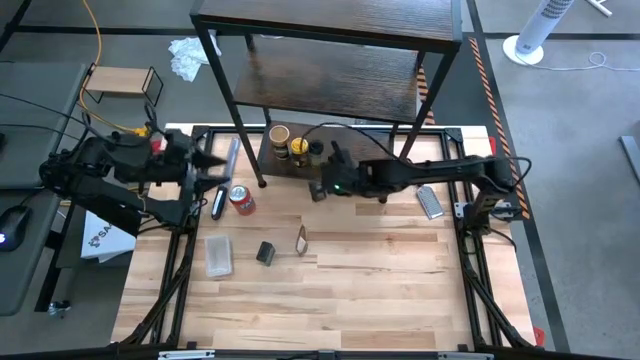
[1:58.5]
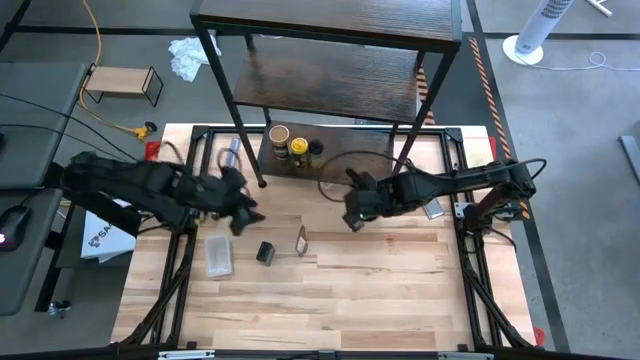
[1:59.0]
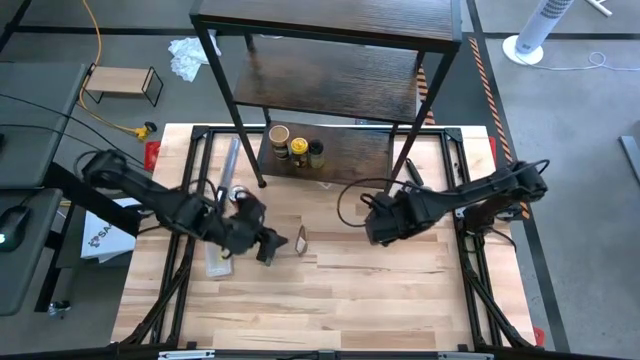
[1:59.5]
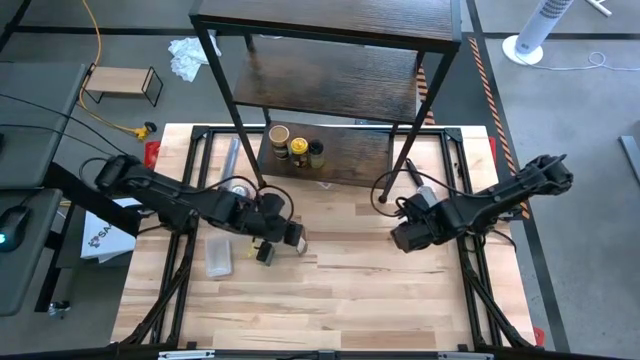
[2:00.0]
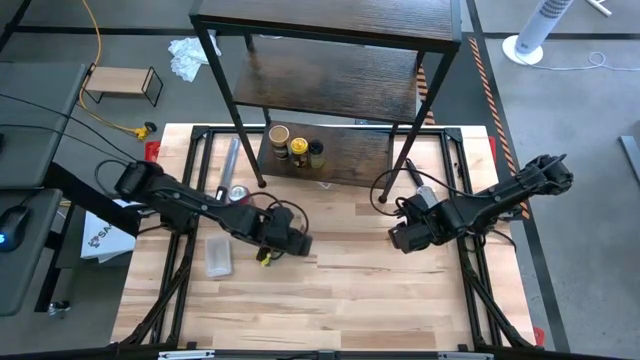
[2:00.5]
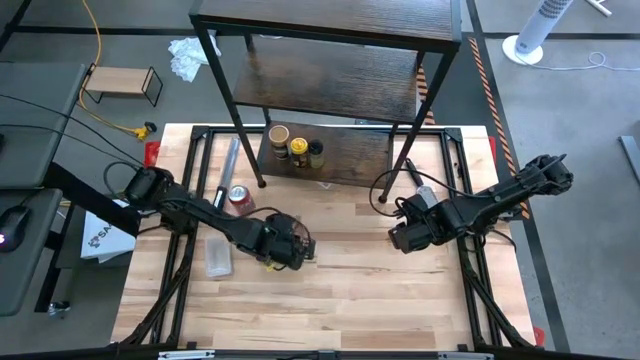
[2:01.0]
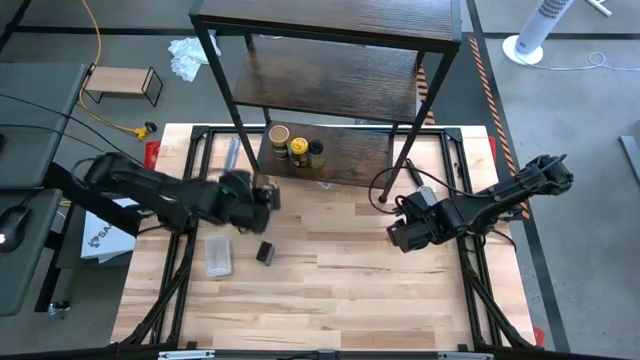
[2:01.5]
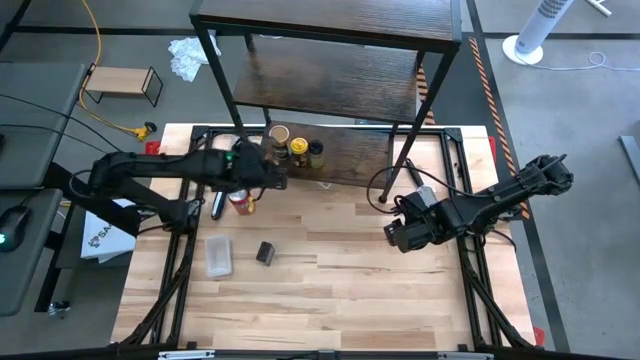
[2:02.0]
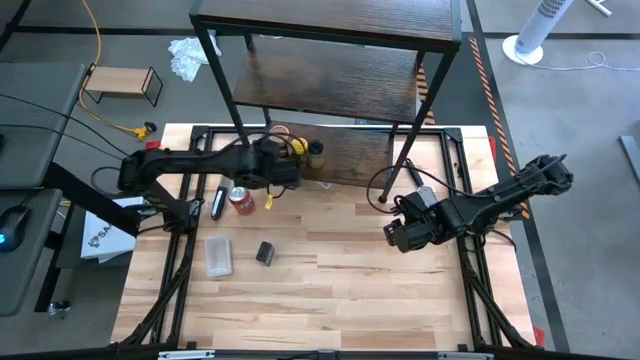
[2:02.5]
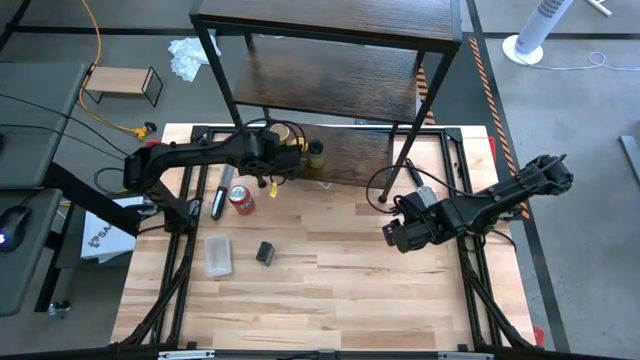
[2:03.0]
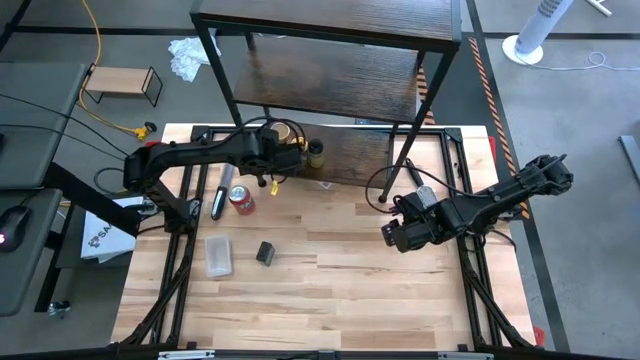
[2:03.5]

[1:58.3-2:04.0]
Task: Shelf spices
Put the seasoning bag on the left of the bottom shelf

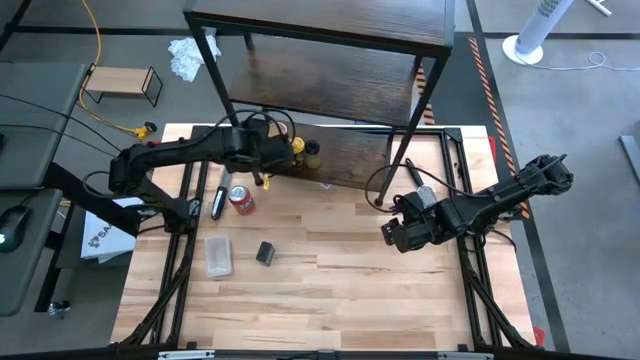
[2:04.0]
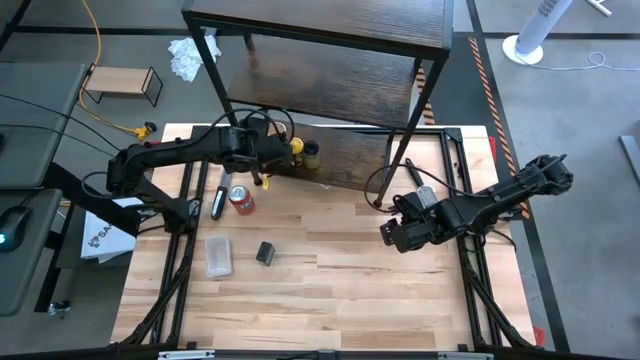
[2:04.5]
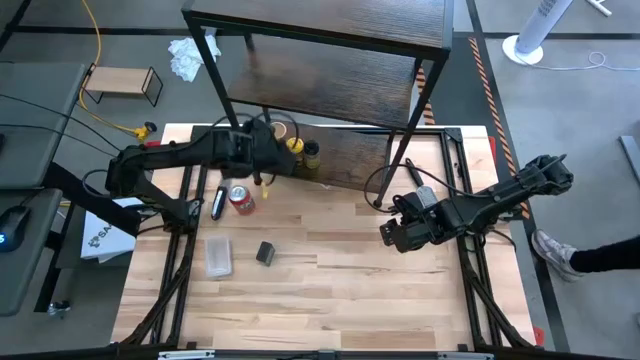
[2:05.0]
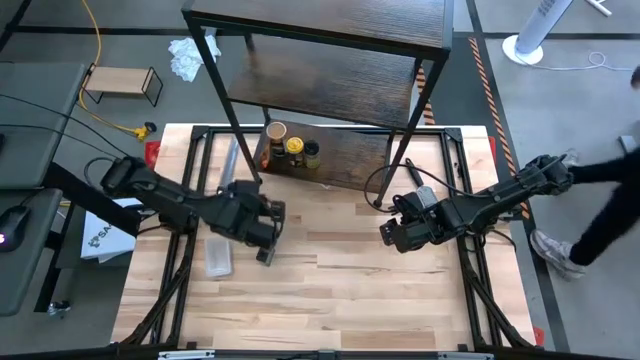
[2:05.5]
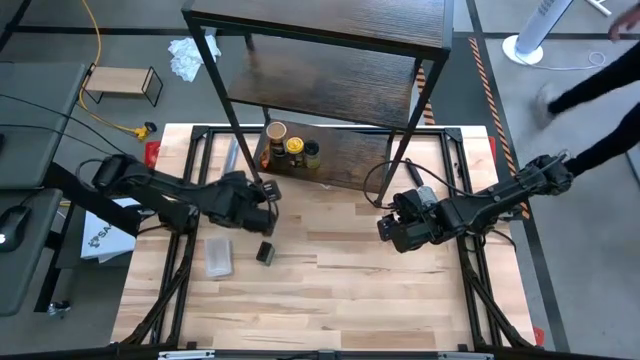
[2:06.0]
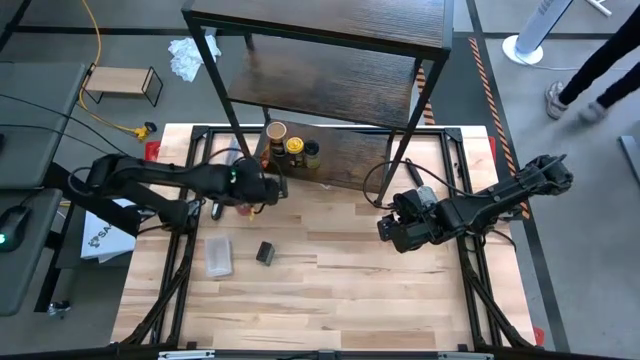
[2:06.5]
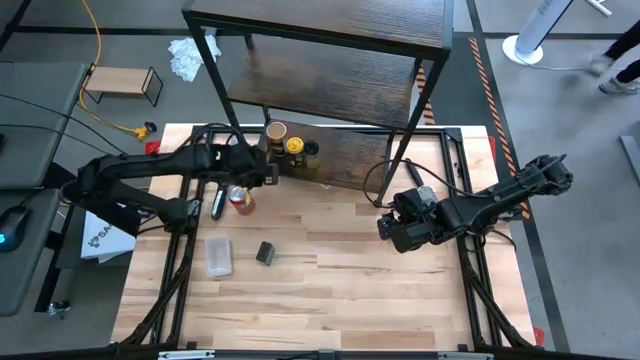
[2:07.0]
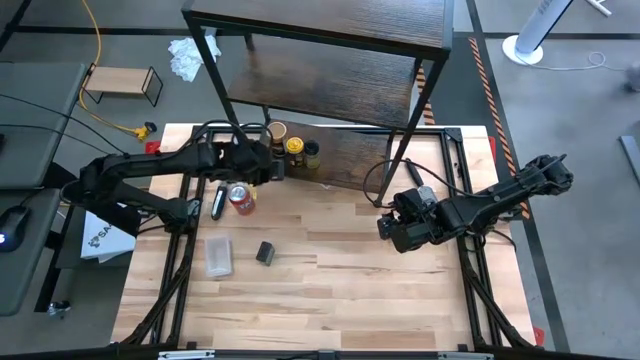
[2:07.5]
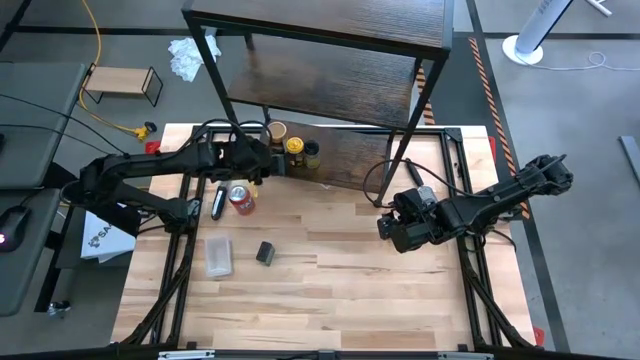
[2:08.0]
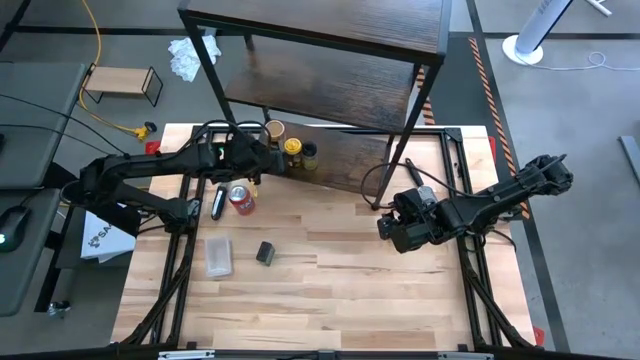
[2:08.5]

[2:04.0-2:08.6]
Adjust the seasoning bag

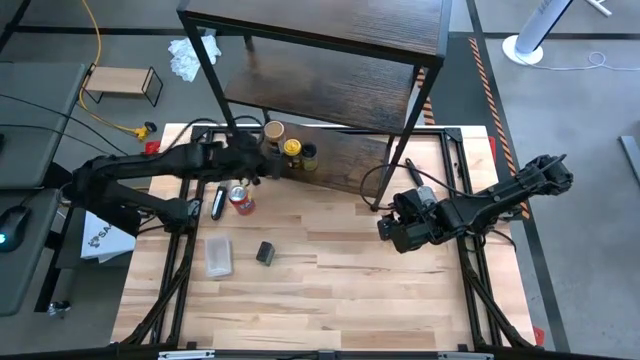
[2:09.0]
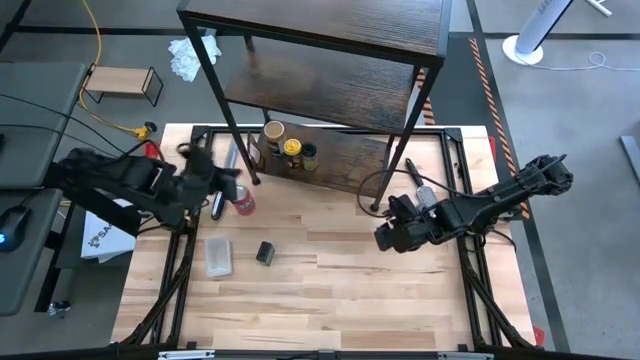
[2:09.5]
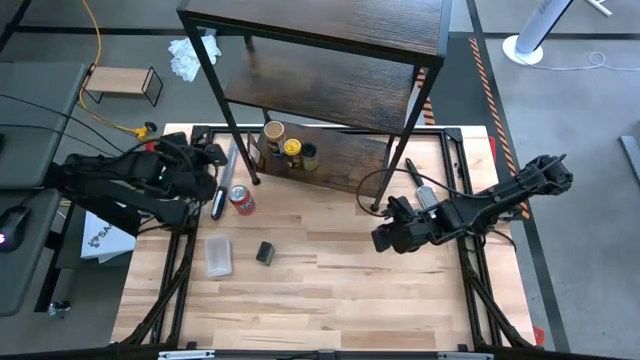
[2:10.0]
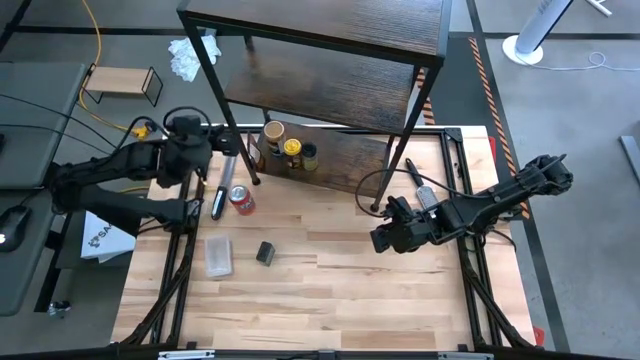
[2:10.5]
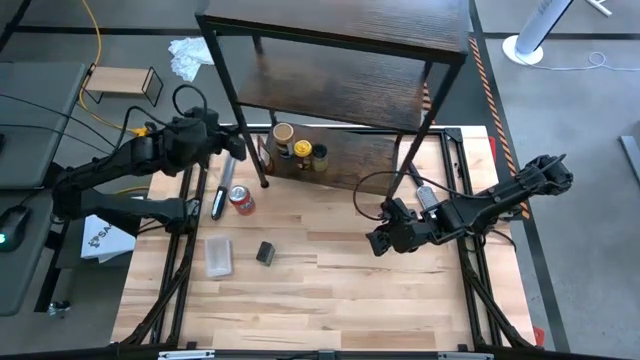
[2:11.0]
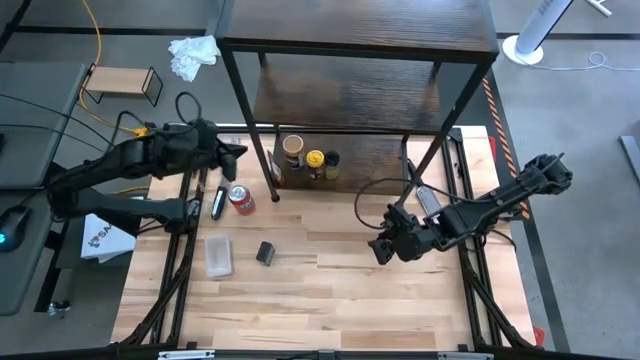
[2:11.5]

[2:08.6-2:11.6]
Adjust the shelf

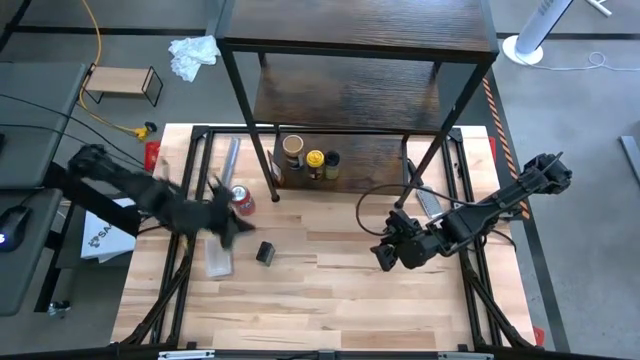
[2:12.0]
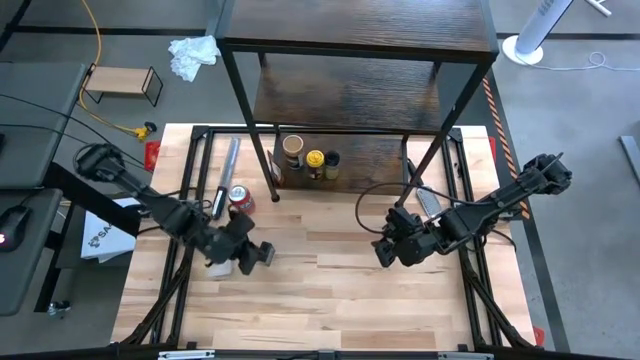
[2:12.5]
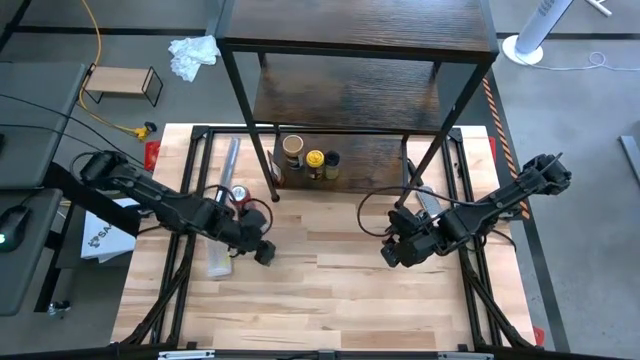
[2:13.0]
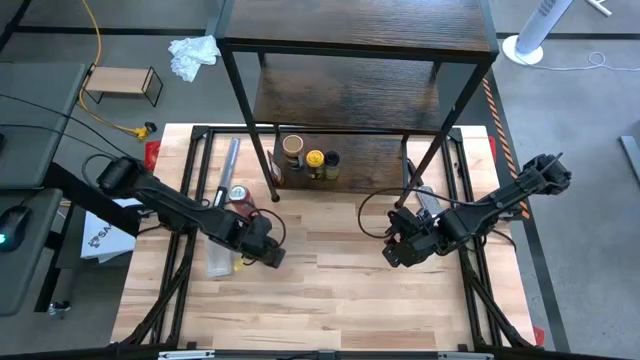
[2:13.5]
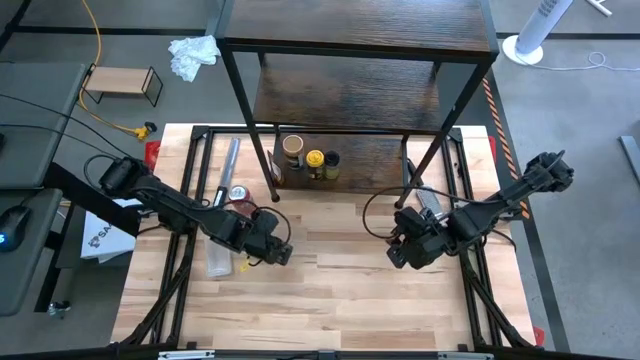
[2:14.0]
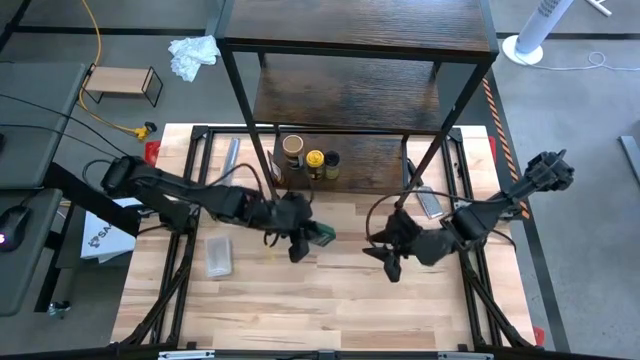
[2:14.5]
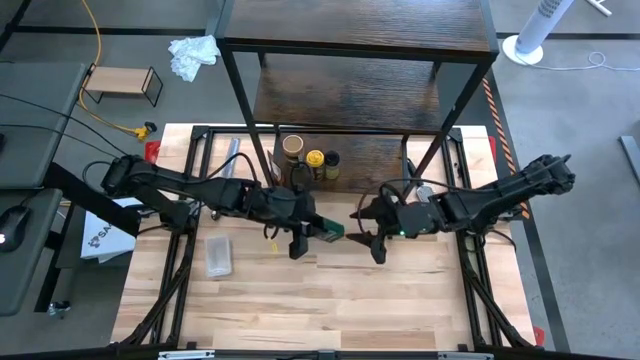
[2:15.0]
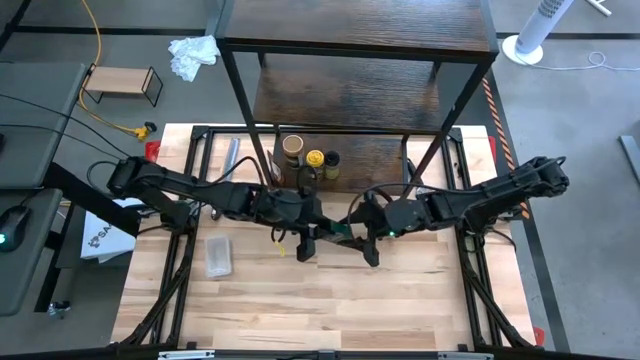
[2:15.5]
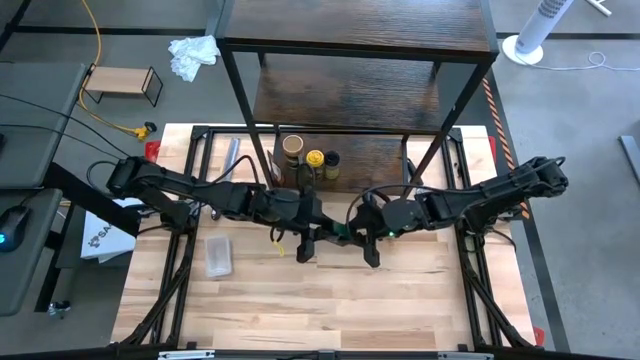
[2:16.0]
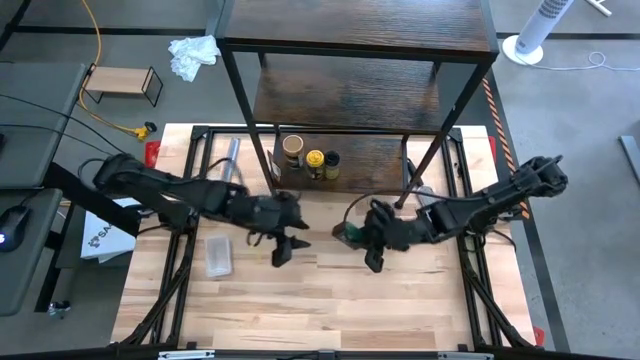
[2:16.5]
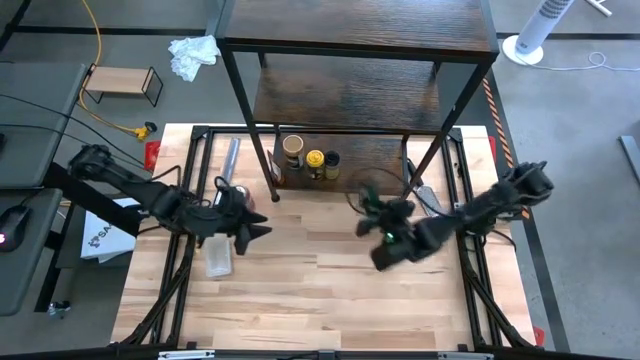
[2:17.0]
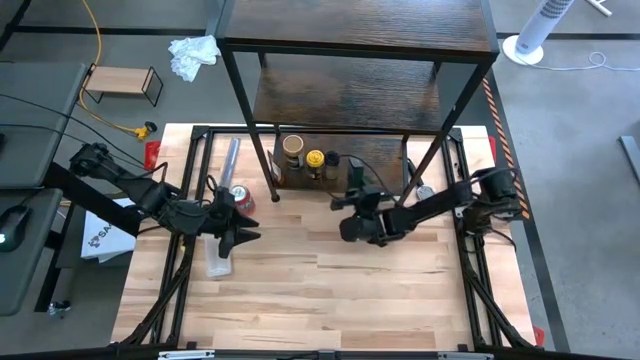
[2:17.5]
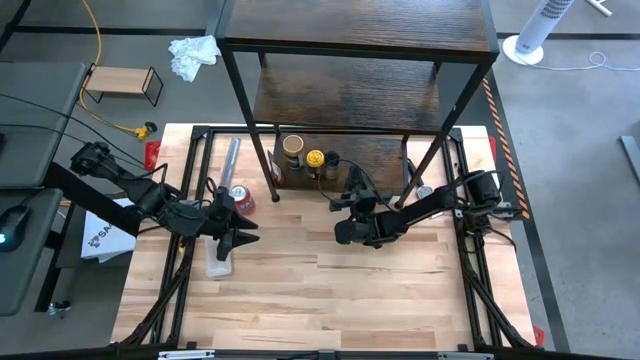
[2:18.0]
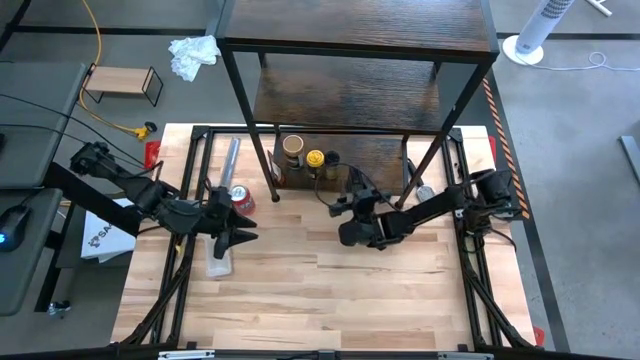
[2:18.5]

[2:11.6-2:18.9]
Put the black seasoning box on the bottom shelf aligned with the black seasoning bottle

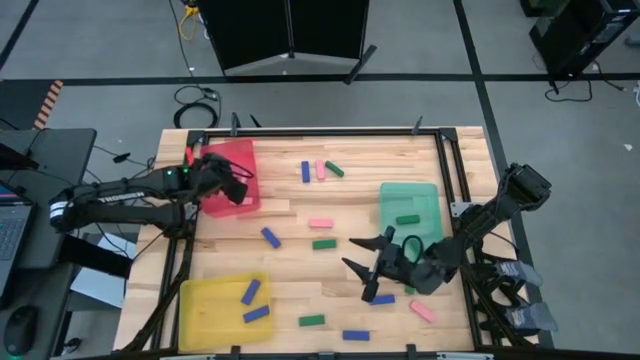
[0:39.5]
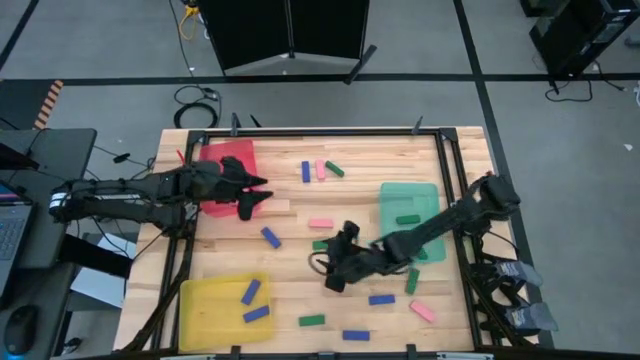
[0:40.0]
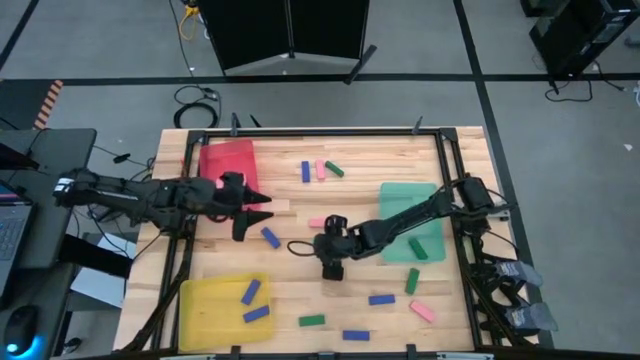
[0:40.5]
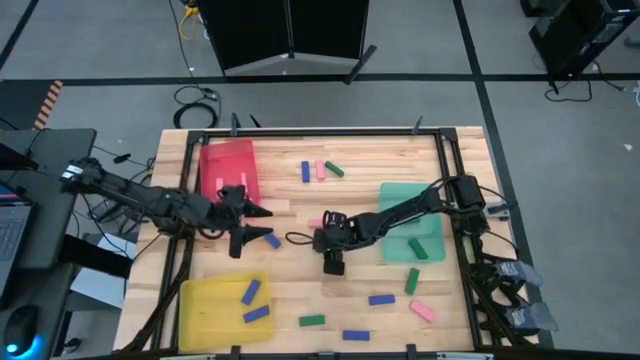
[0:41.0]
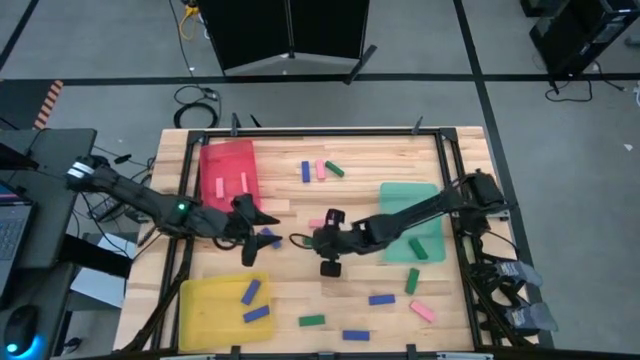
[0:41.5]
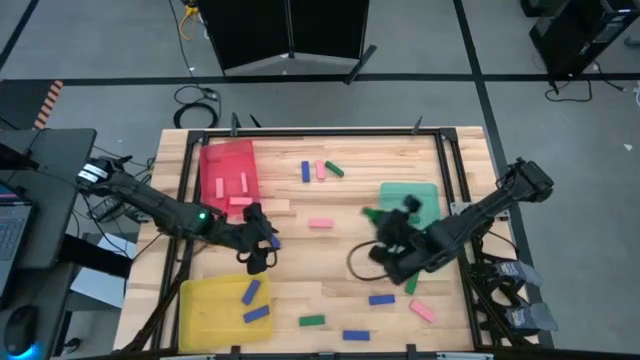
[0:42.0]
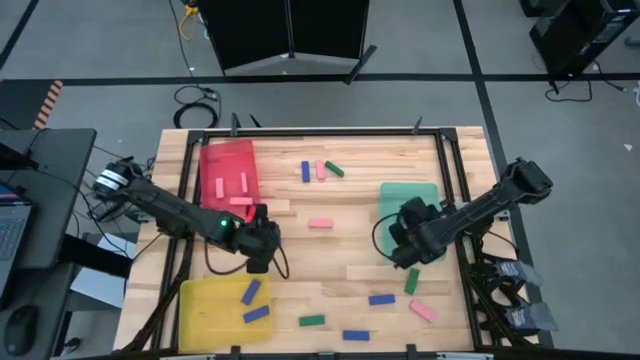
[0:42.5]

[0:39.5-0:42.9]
Task: Sort blocks
Put the green block into the blue bin
